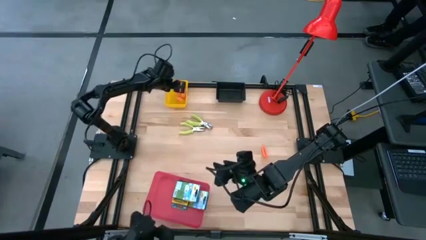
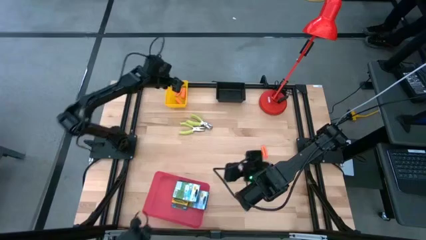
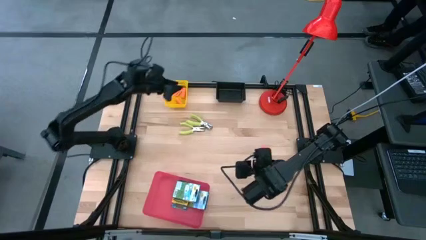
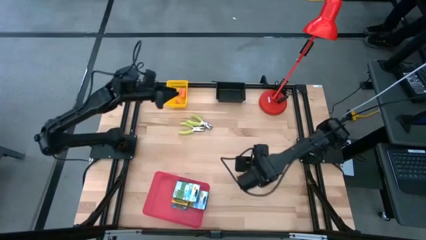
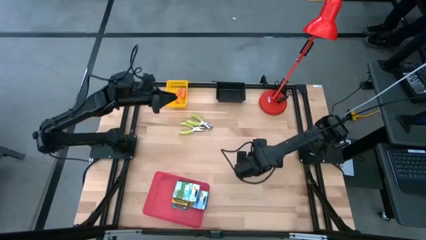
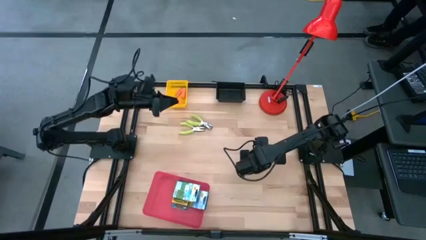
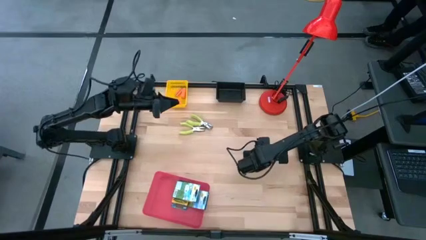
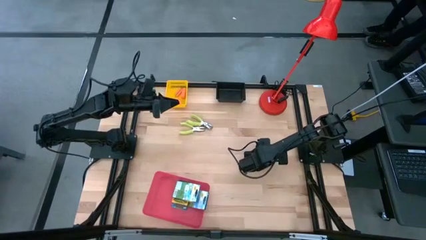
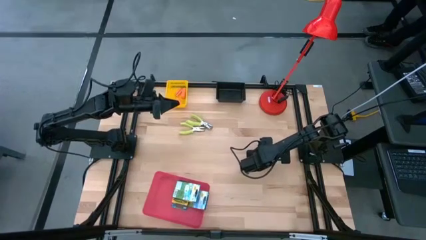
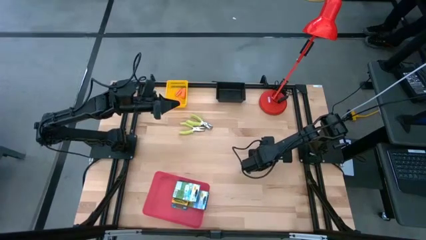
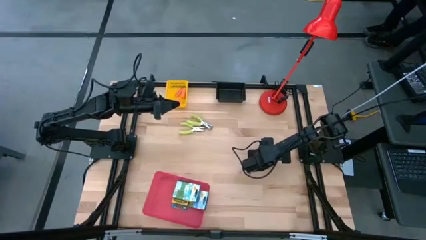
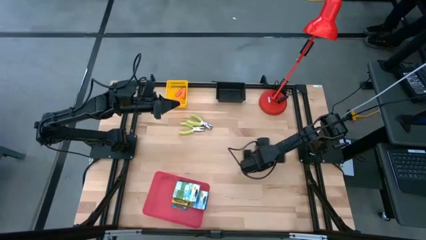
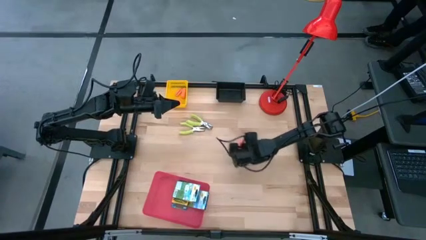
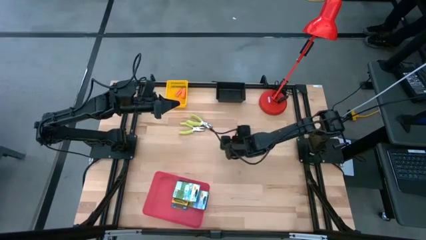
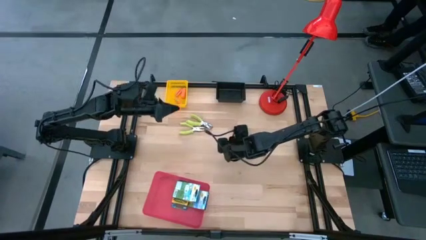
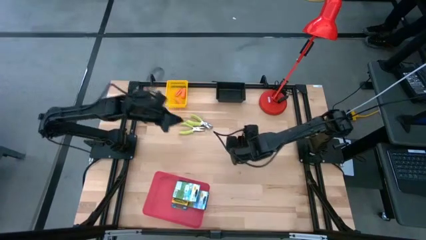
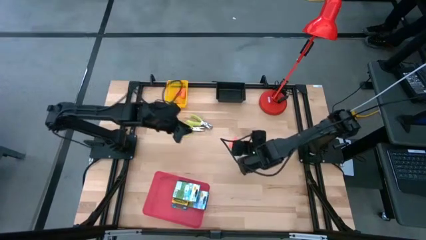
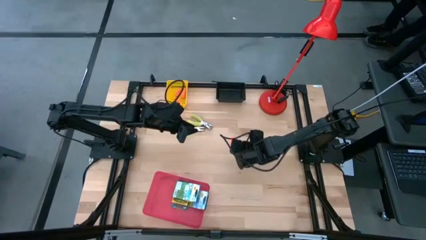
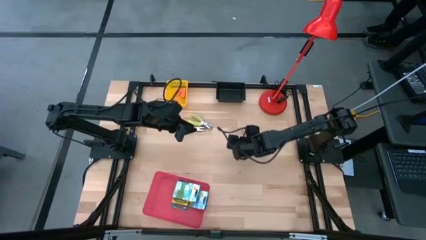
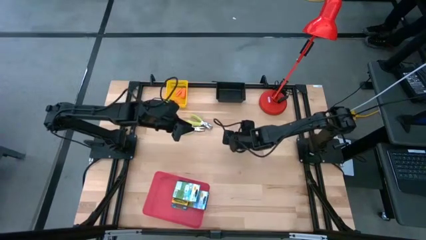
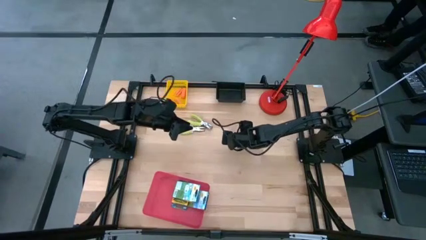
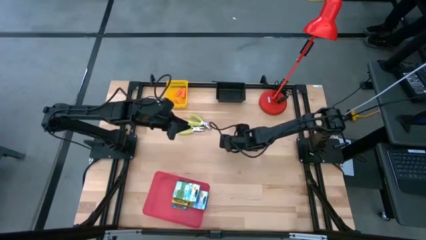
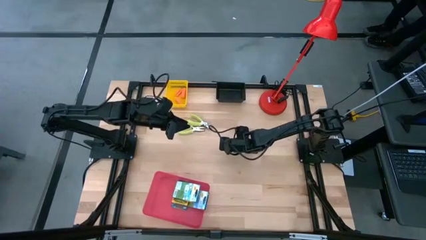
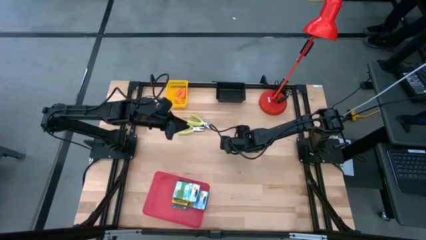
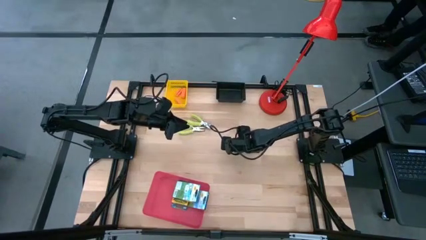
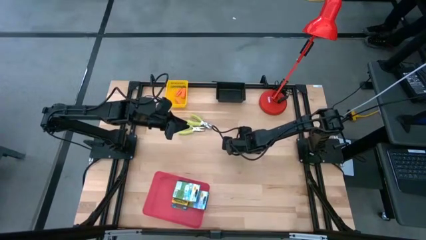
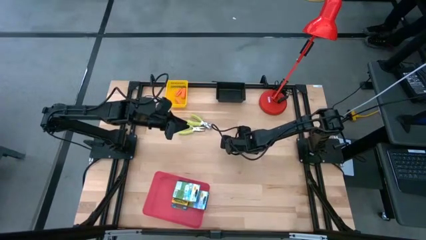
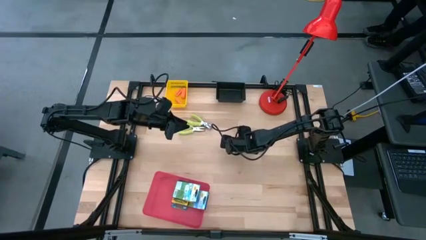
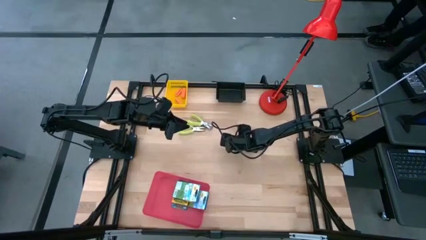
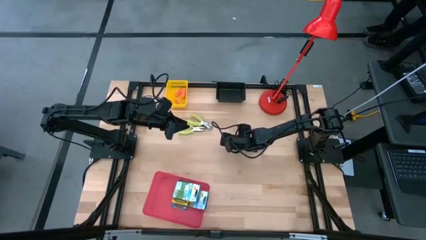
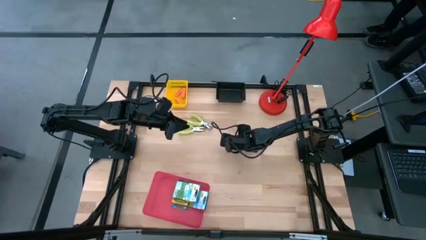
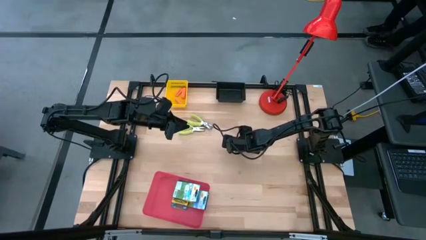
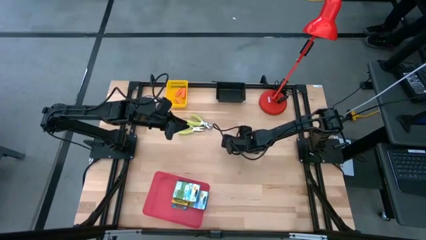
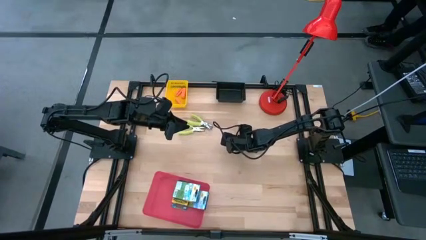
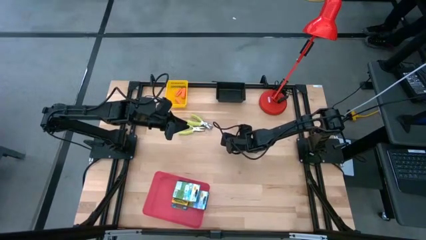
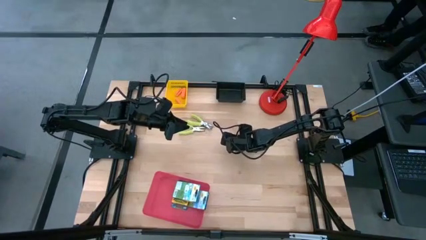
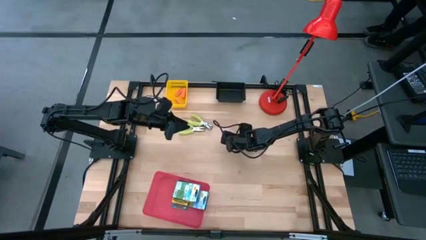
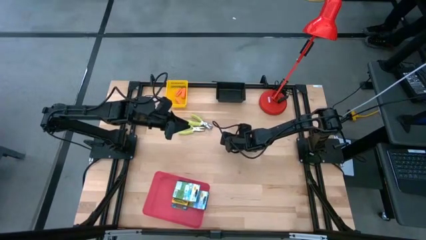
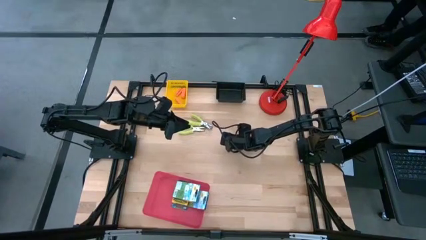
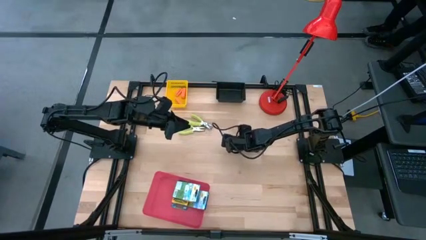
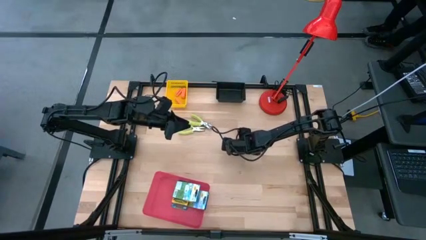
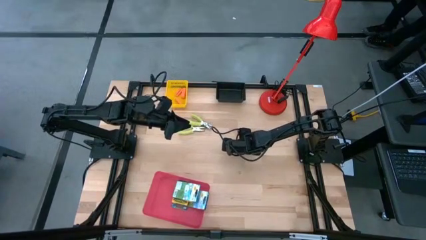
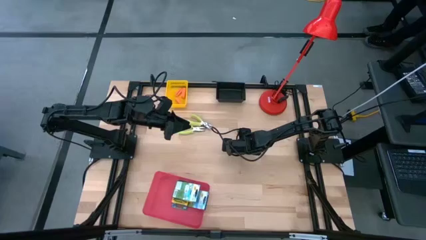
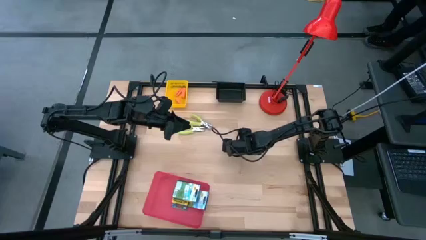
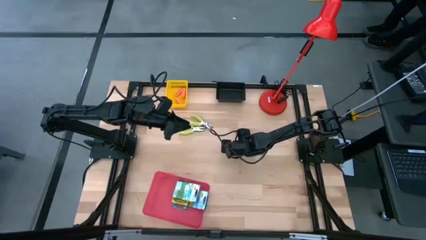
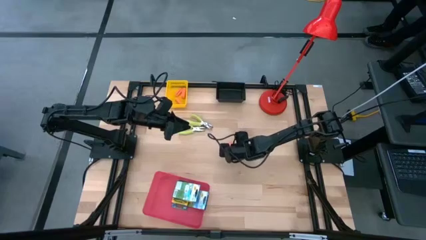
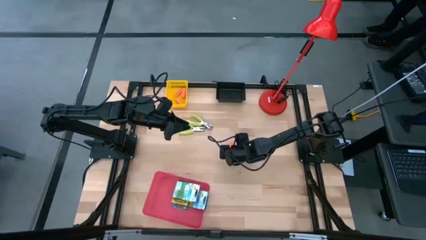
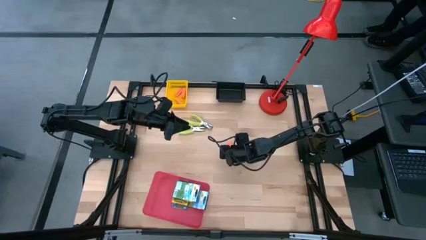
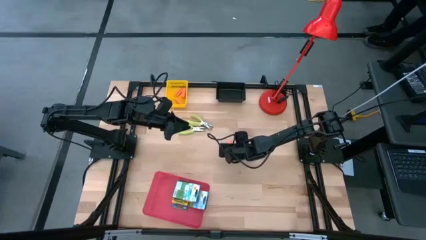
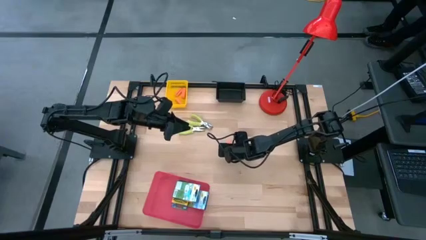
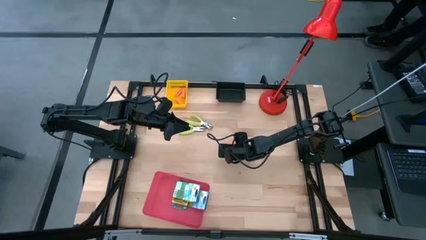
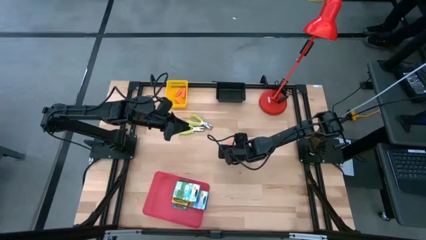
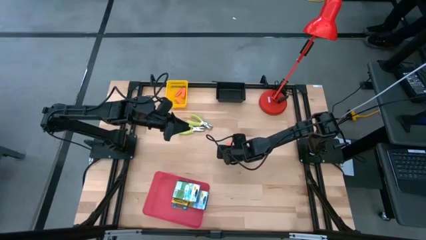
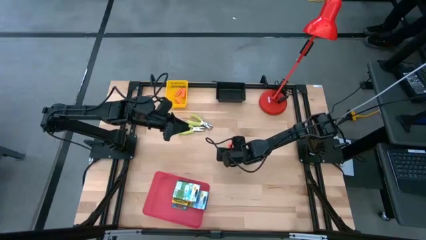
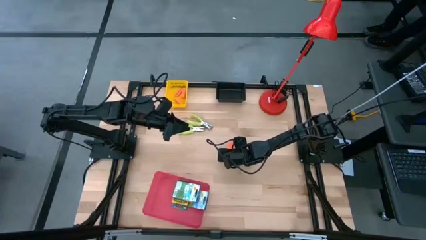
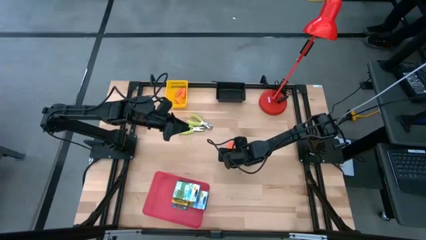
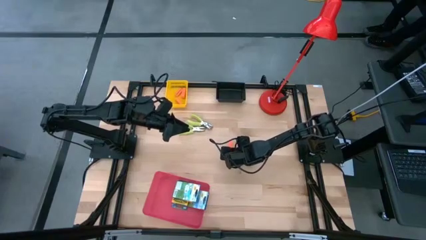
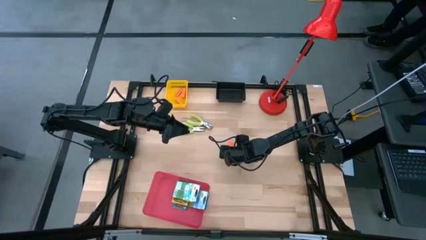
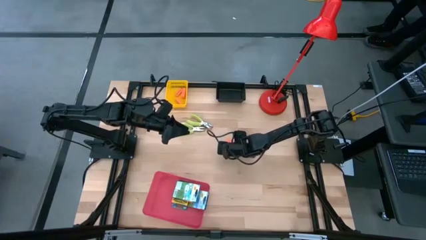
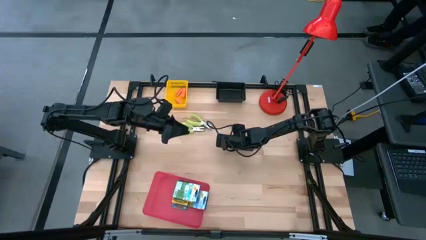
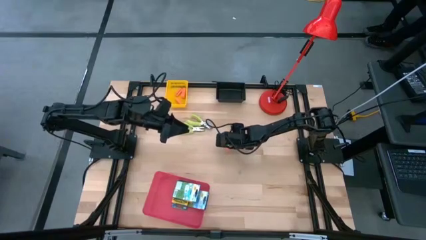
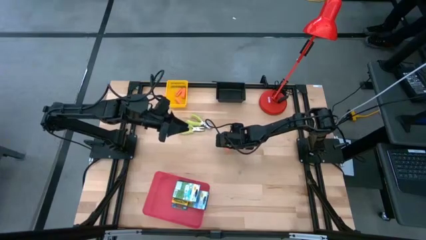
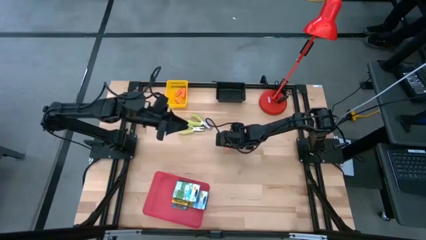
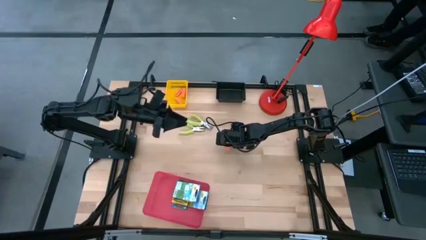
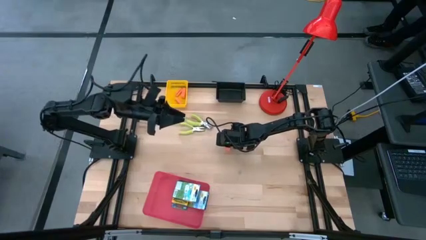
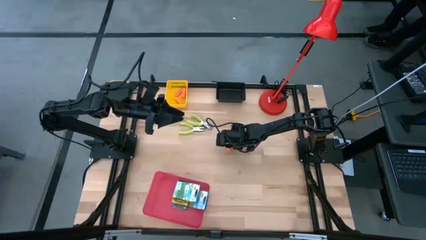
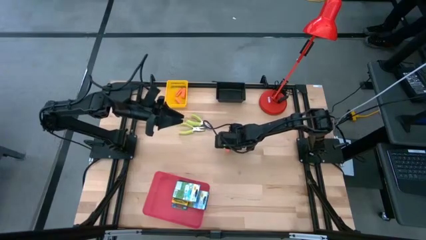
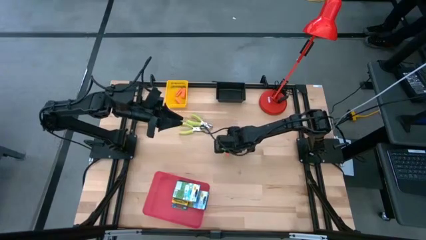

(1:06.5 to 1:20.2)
Task: Pick & Place School Supplies
Put the orange eraser into the yellow bin

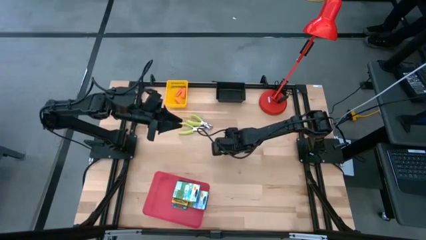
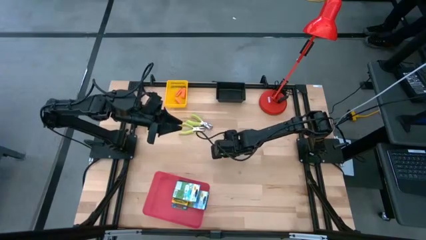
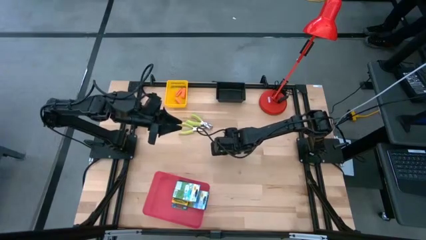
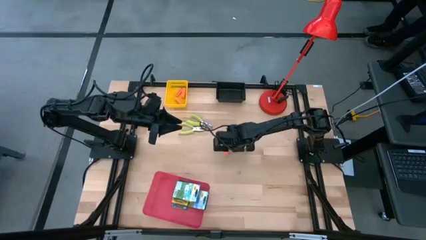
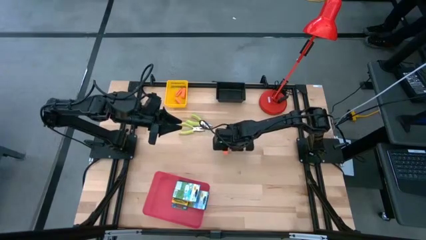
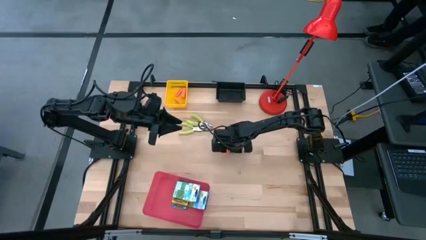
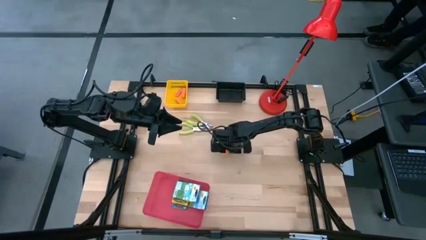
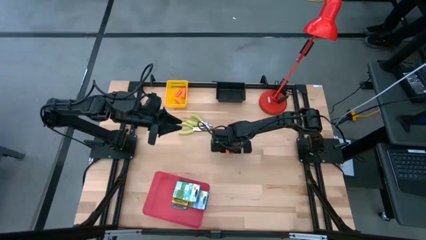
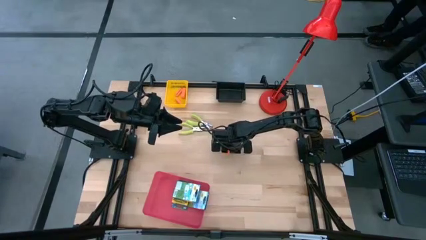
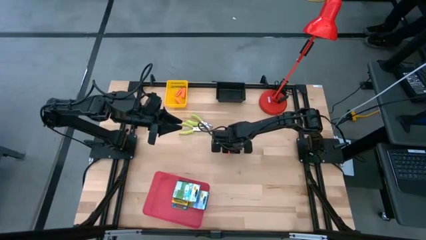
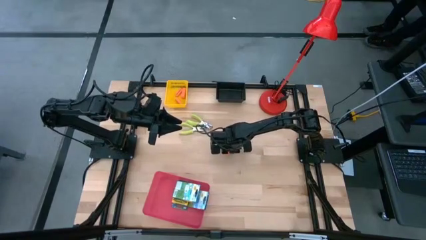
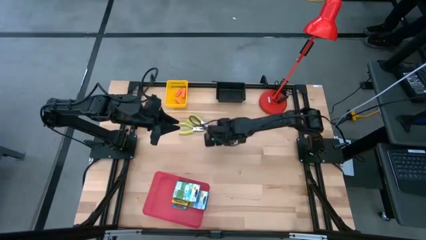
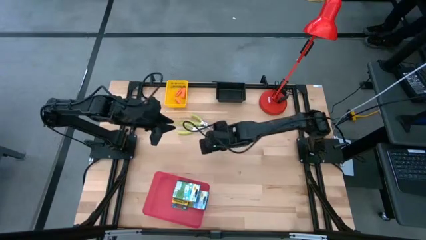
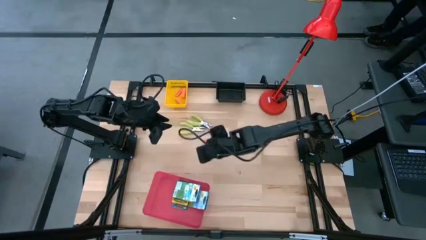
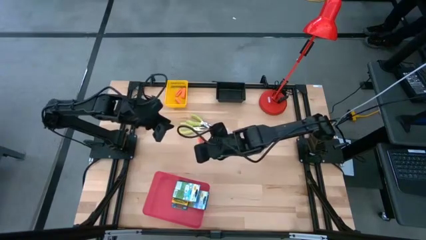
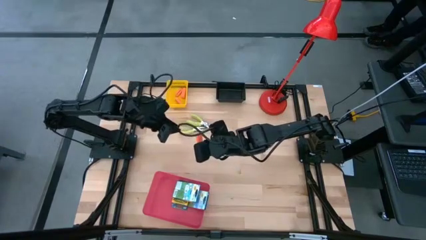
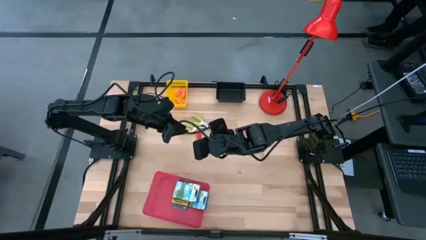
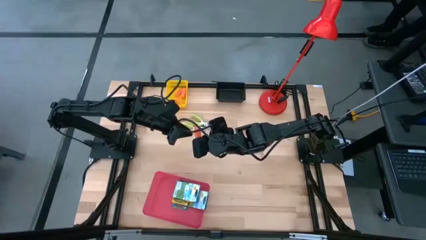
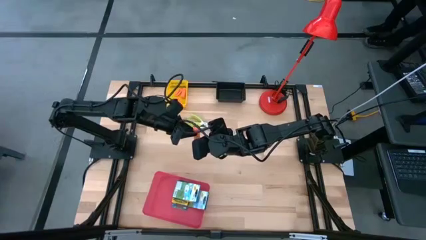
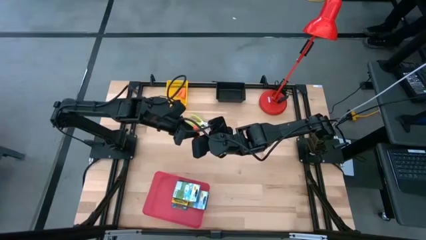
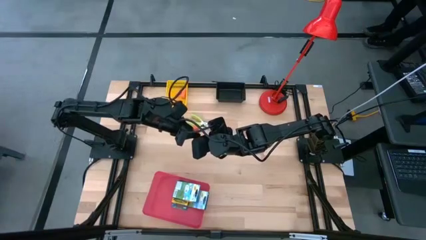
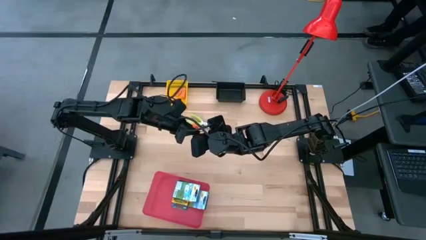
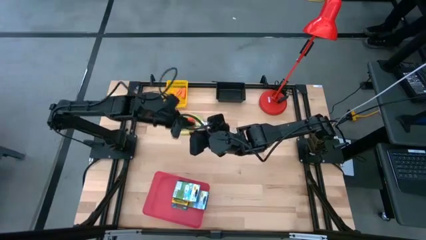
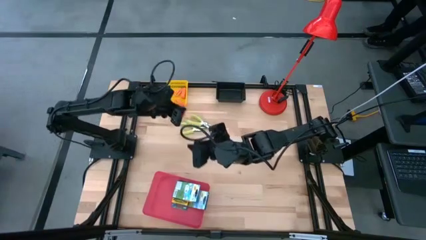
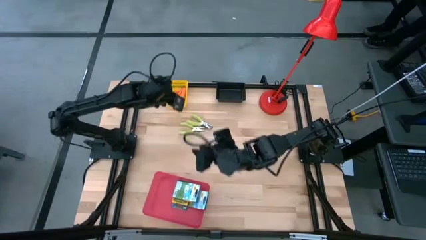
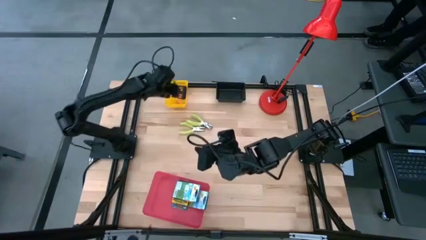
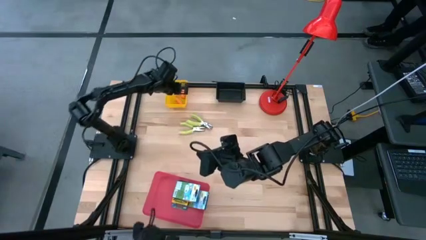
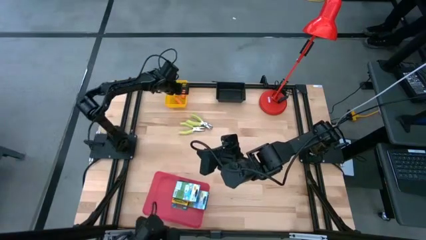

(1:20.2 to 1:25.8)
Put the orange eraser into the yellow bin
